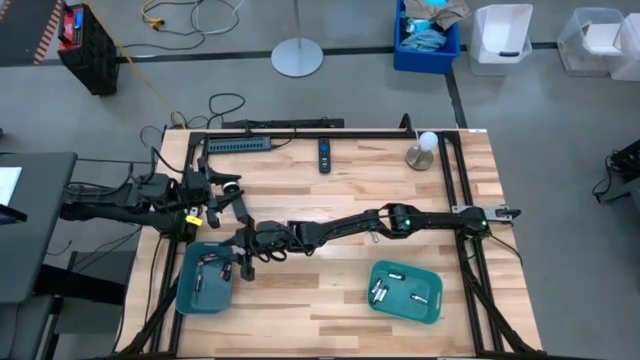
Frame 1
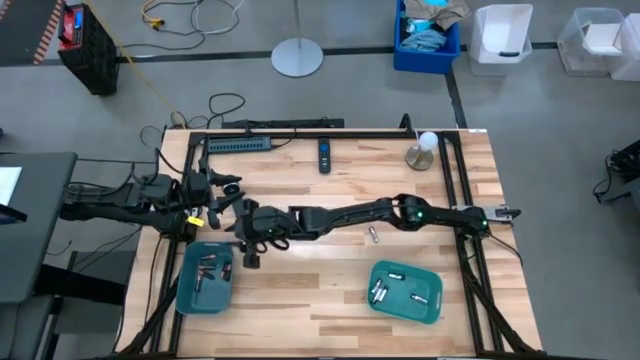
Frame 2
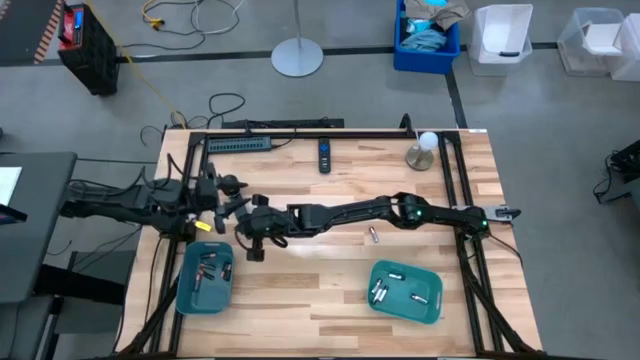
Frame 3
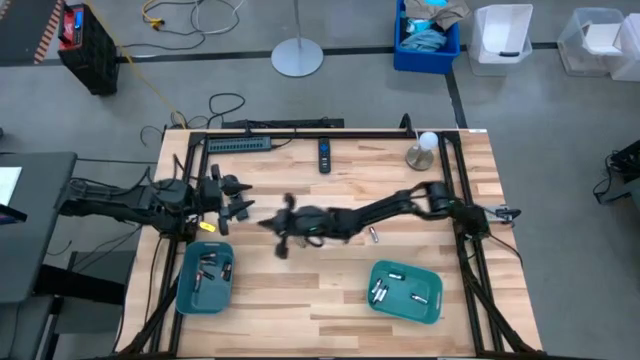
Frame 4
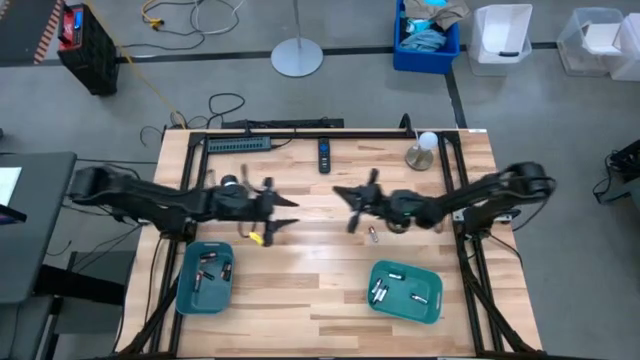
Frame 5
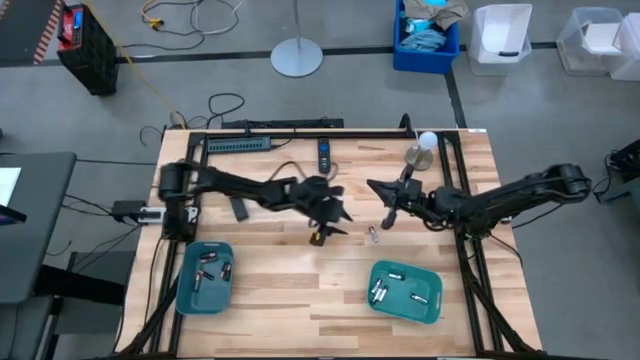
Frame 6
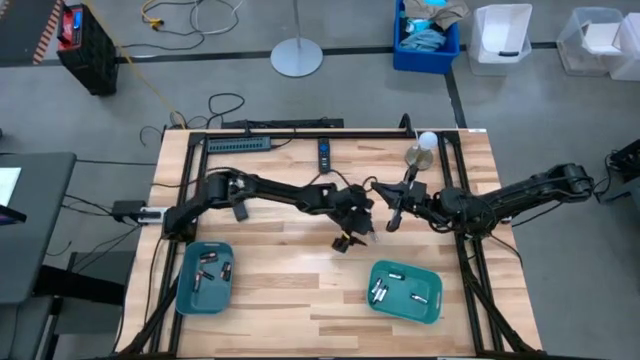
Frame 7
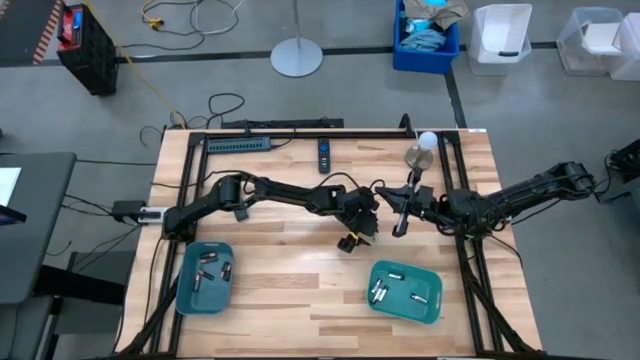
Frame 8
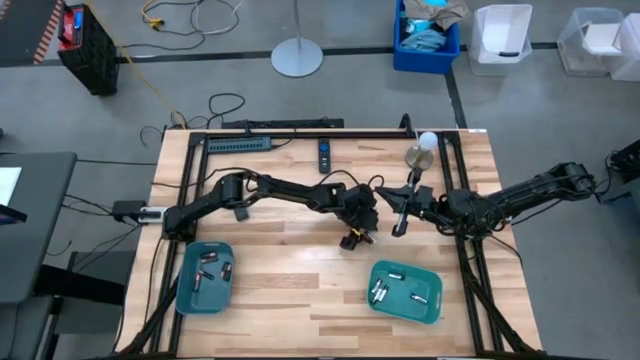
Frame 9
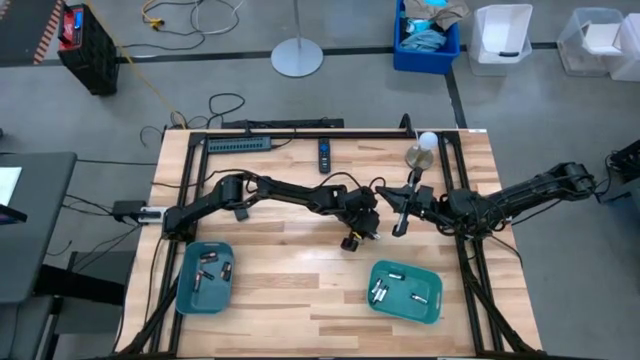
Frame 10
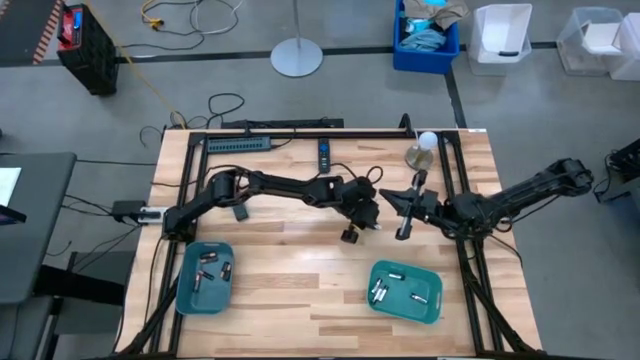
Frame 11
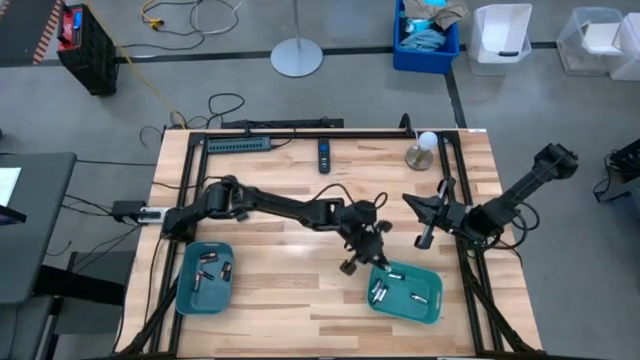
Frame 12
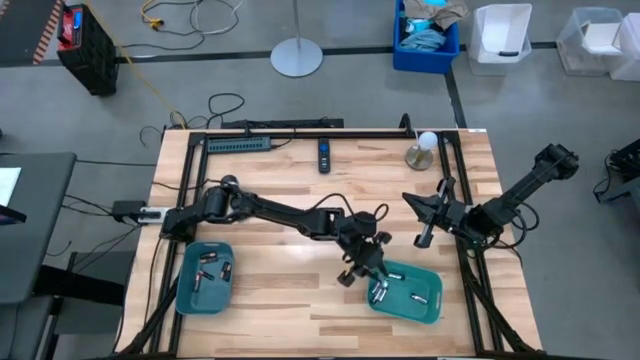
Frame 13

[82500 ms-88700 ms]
Task: Sort batteries
Put the silver battery into the green bin

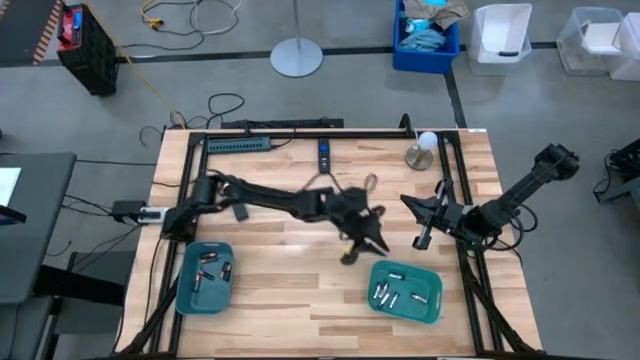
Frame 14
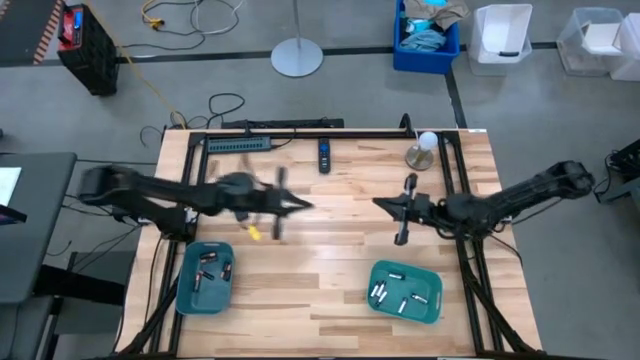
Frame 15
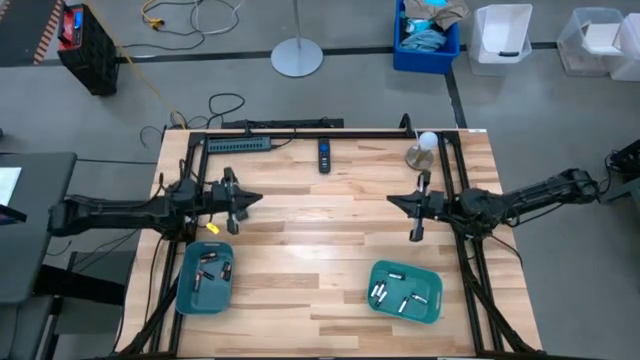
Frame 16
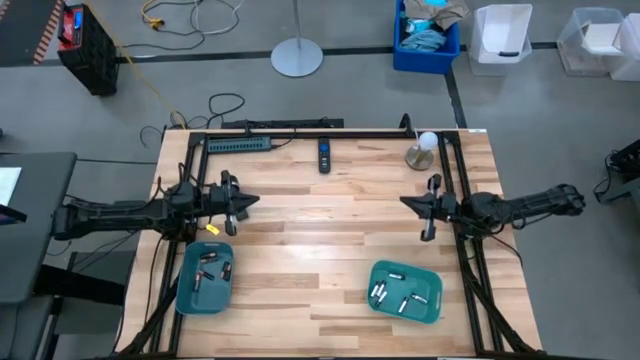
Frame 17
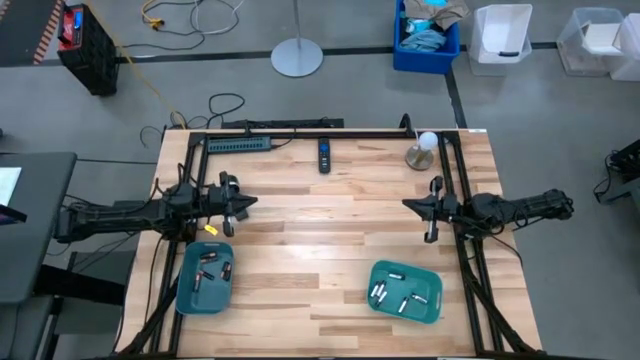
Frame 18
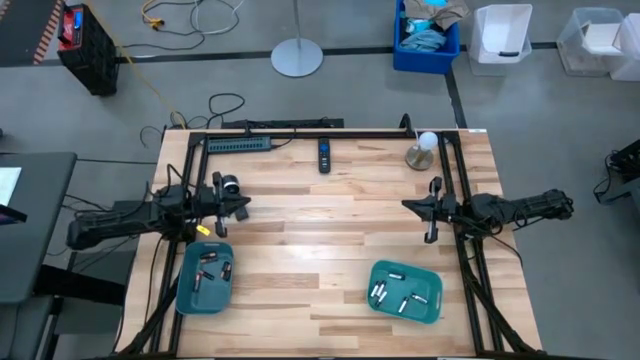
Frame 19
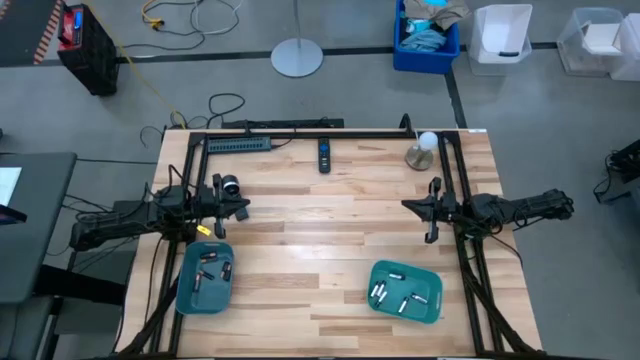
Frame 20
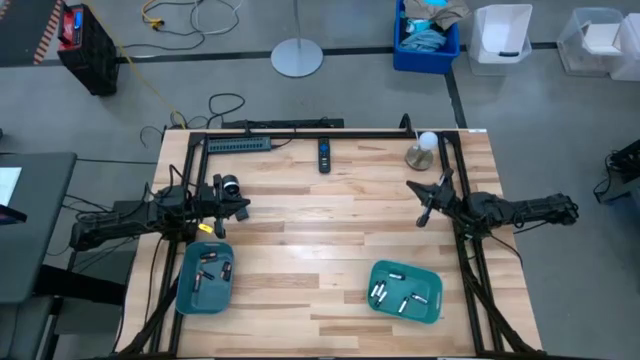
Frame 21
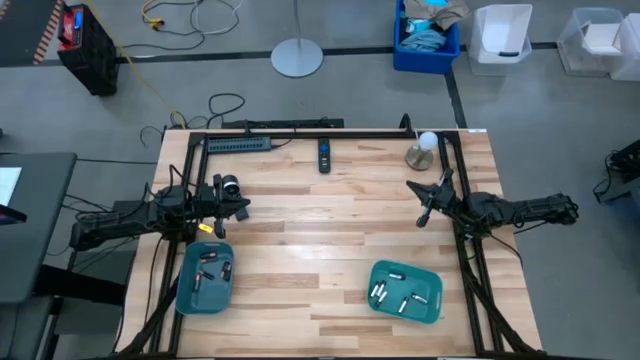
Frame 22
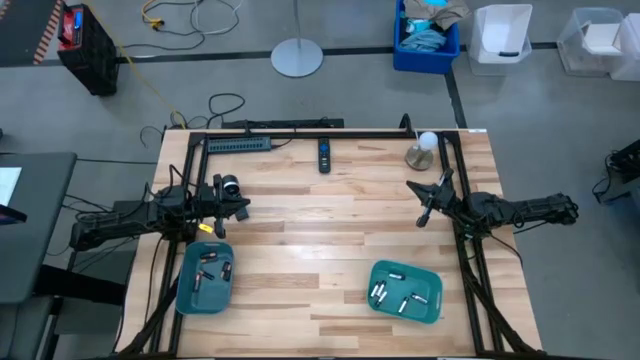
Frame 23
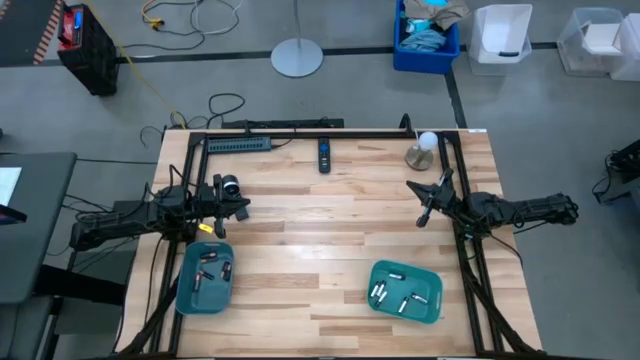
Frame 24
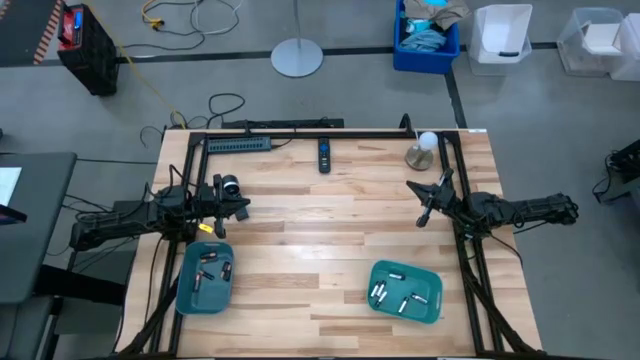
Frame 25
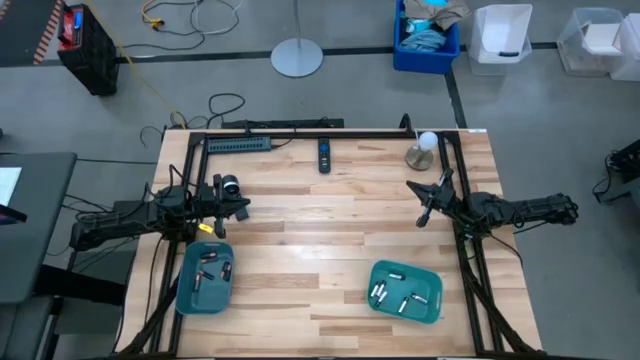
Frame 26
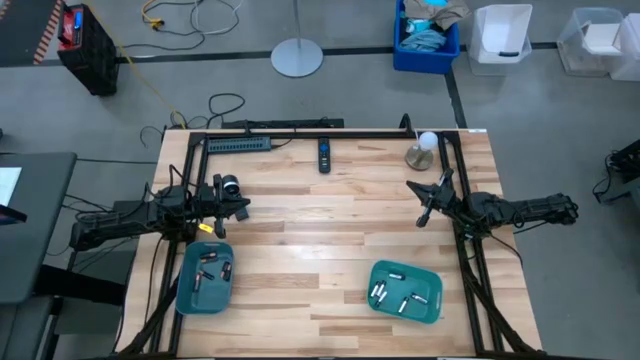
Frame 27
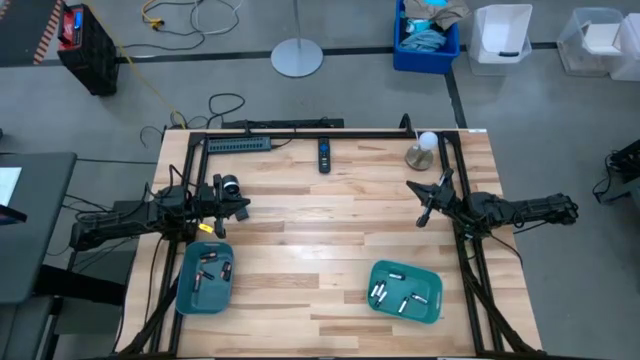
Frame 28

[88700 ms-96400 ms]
Return to Home Position

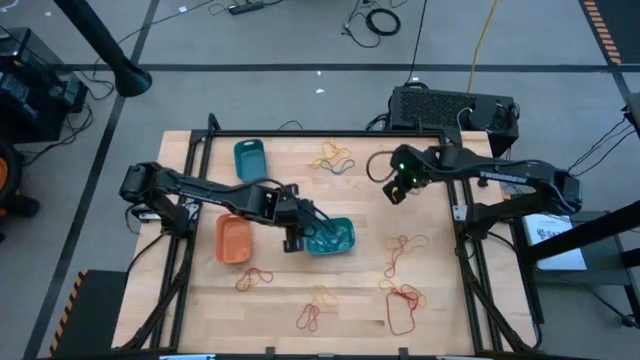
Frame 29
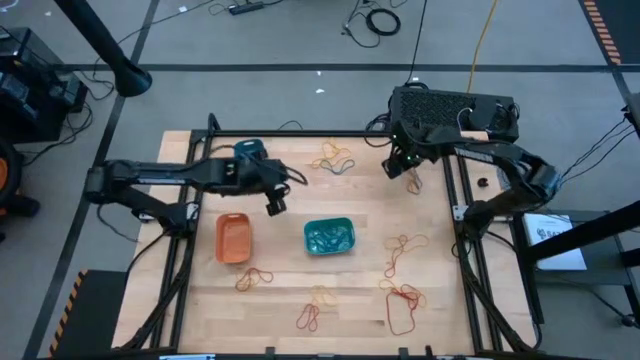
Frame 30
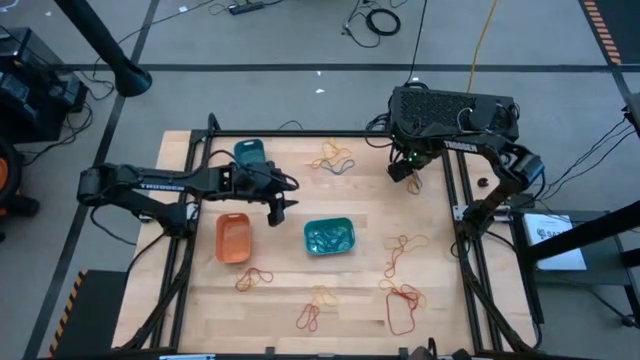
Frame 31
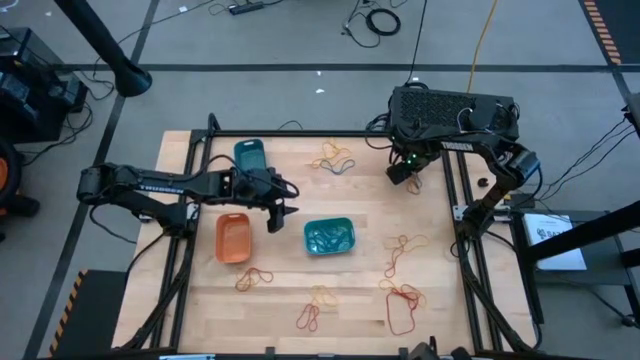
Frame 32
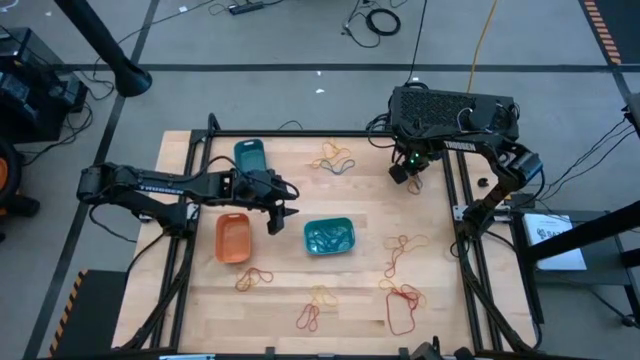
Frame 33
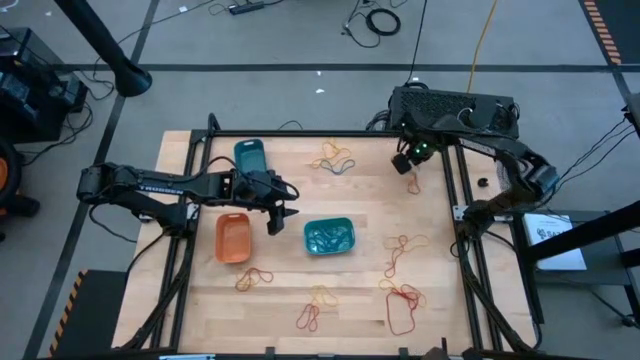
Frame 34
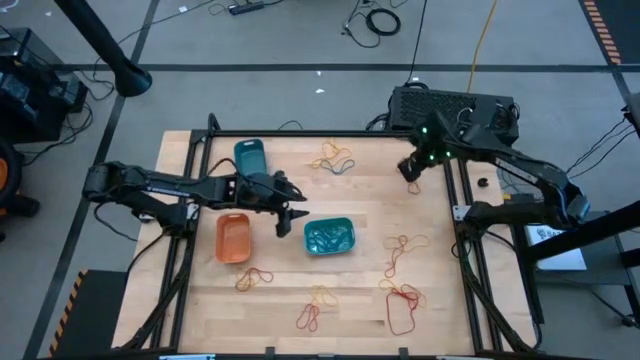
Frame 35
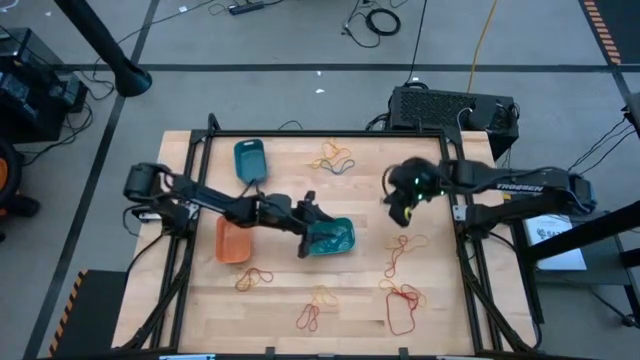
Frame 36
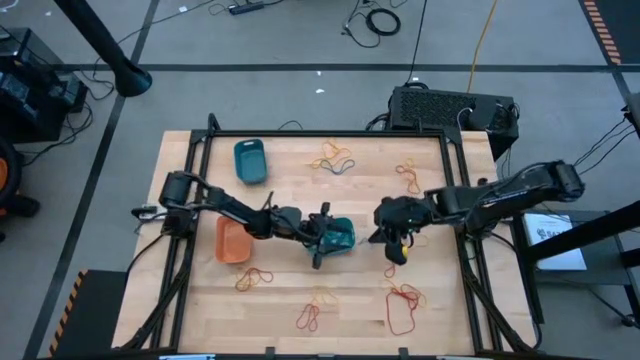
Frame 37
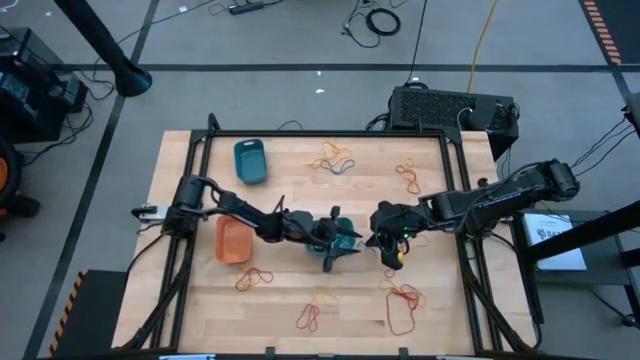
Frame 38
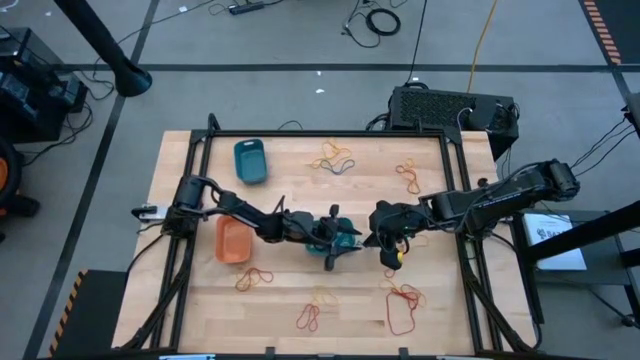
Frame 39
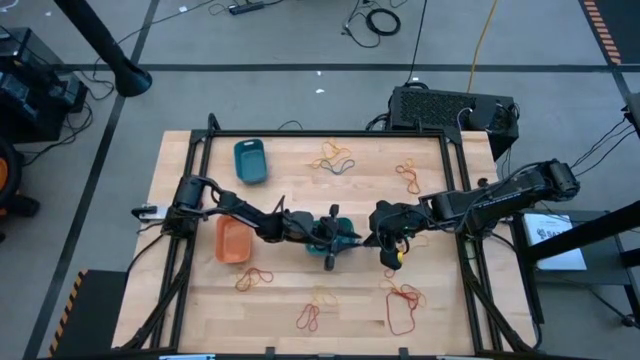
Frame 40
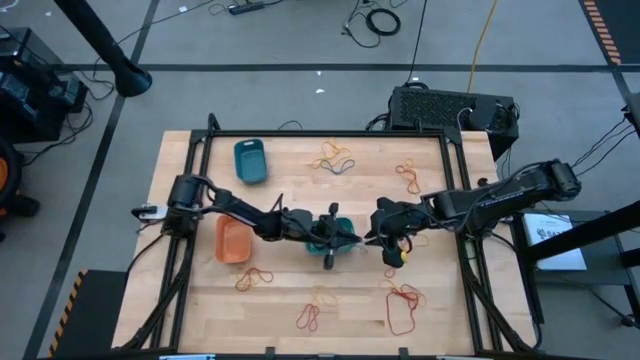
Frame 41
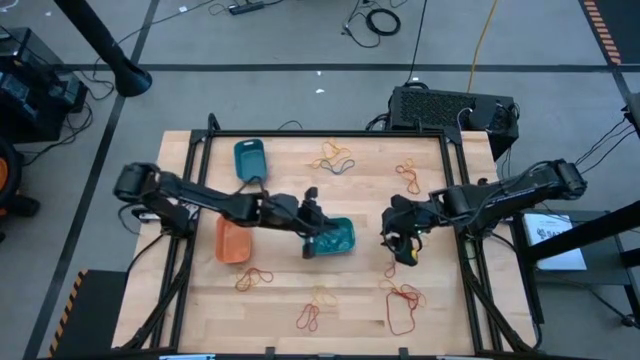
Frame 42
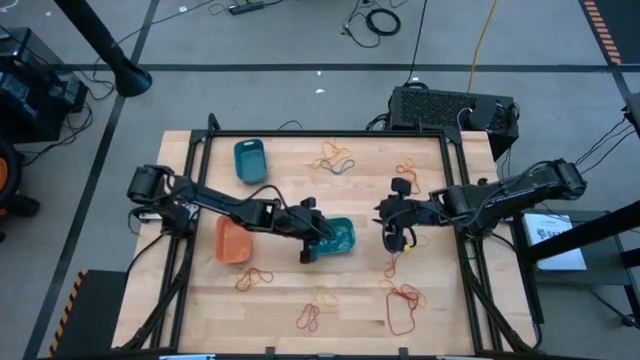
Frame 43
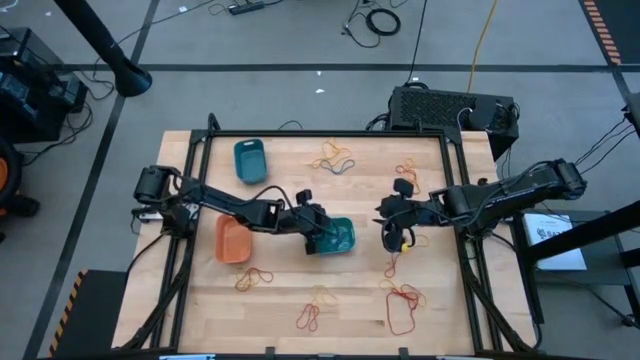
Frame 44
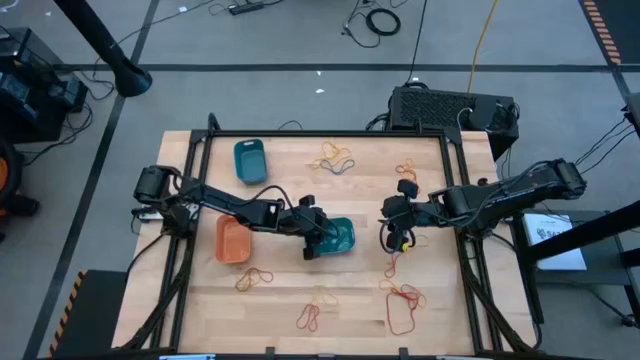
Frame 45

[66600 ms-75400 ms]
Task: Sort rubber bands into baskets
Put the blue rubber band into the green bin
